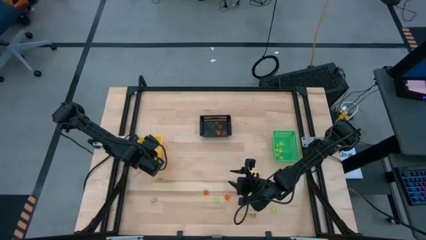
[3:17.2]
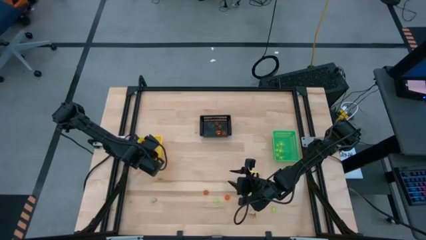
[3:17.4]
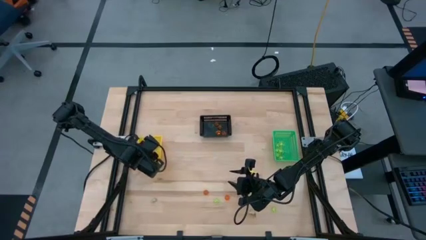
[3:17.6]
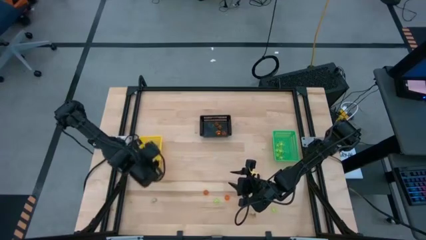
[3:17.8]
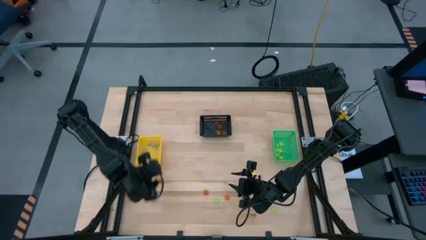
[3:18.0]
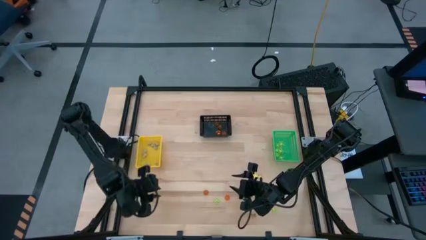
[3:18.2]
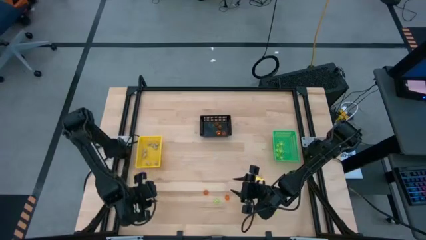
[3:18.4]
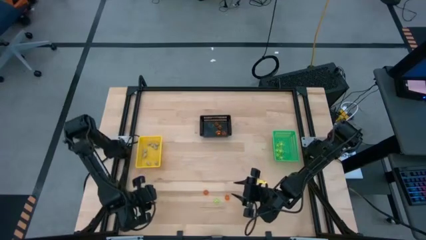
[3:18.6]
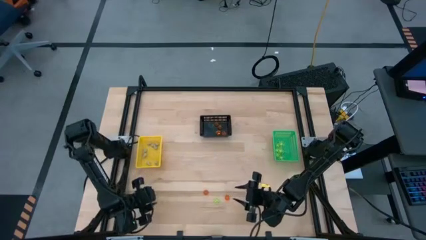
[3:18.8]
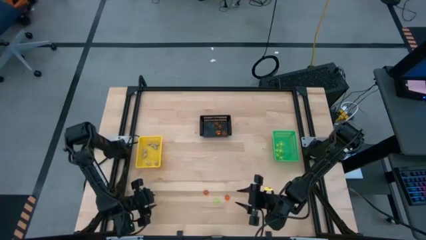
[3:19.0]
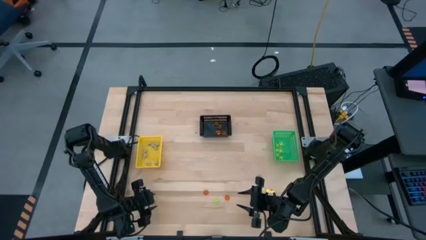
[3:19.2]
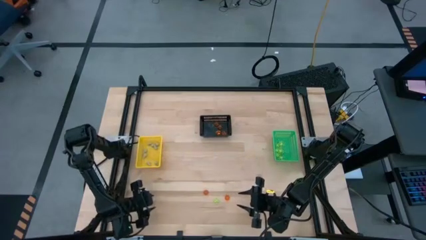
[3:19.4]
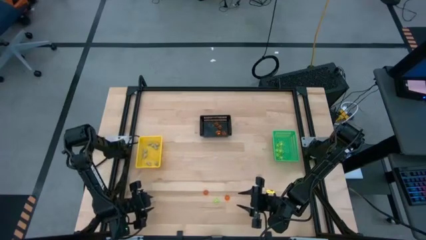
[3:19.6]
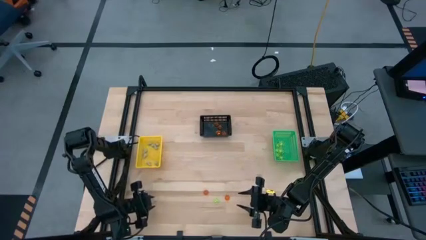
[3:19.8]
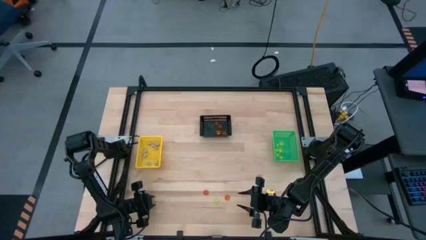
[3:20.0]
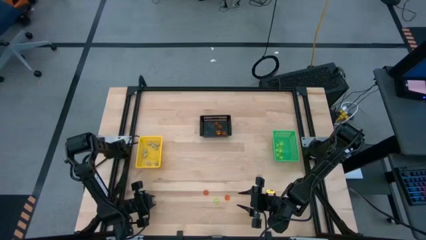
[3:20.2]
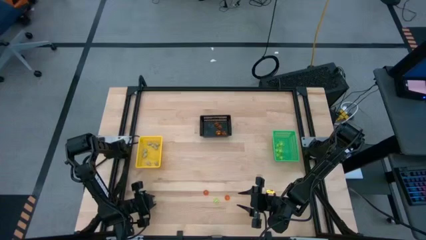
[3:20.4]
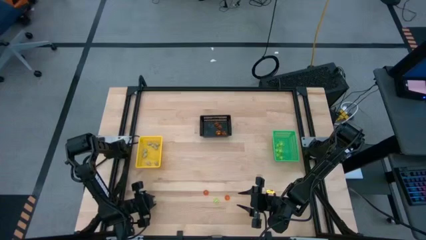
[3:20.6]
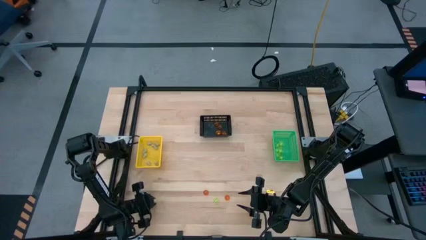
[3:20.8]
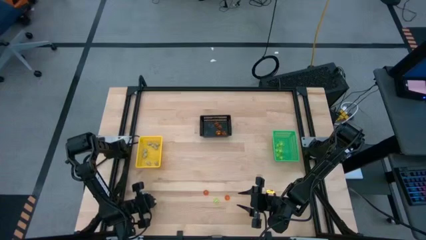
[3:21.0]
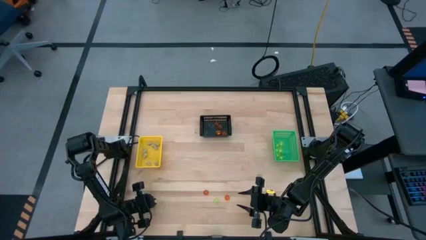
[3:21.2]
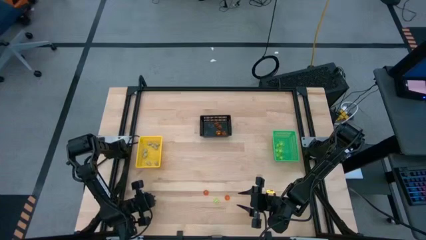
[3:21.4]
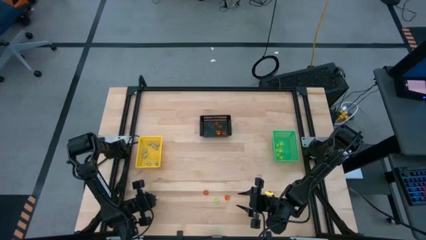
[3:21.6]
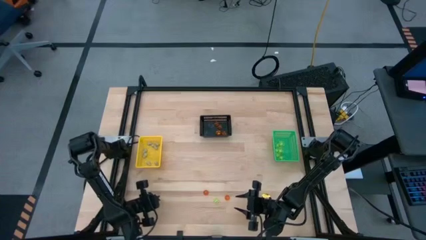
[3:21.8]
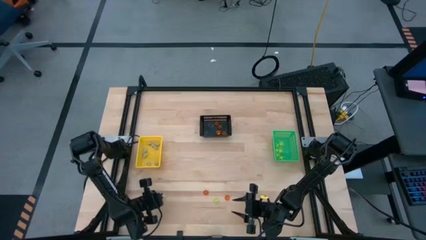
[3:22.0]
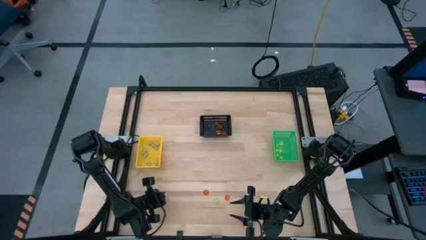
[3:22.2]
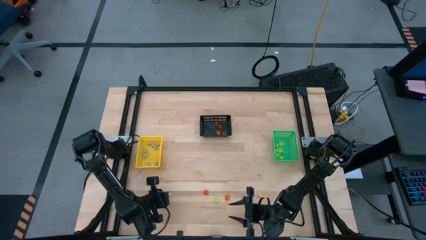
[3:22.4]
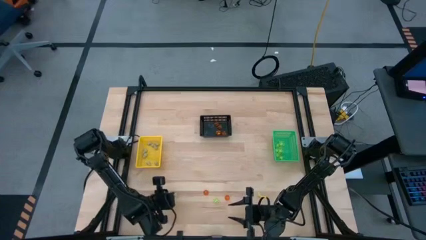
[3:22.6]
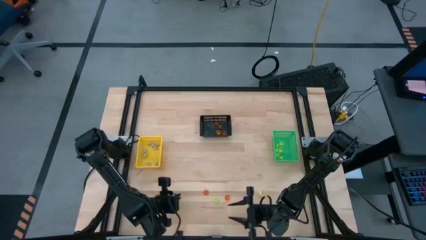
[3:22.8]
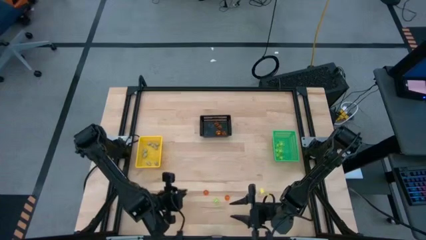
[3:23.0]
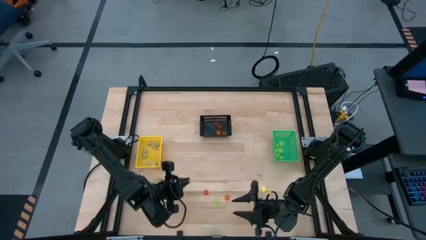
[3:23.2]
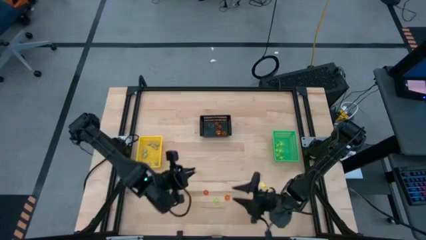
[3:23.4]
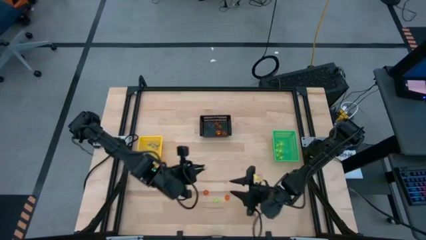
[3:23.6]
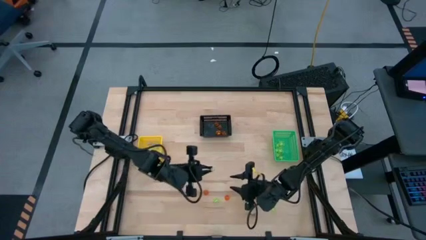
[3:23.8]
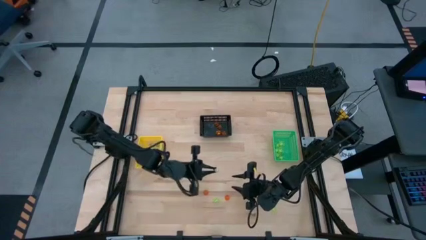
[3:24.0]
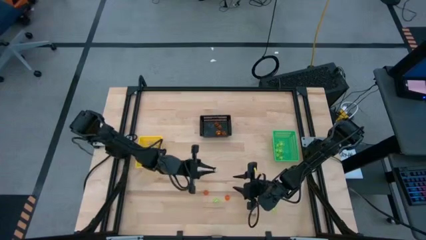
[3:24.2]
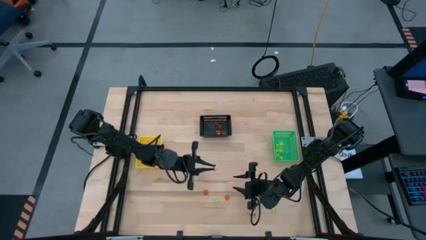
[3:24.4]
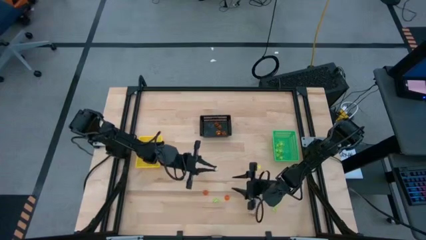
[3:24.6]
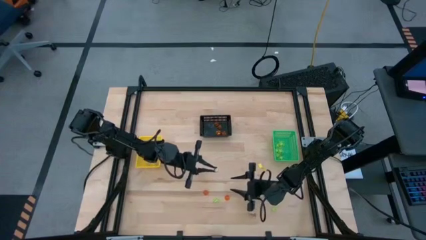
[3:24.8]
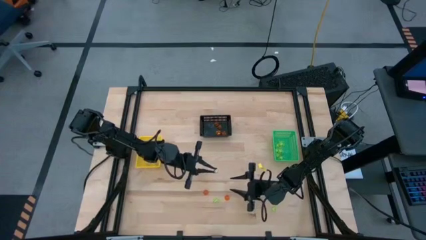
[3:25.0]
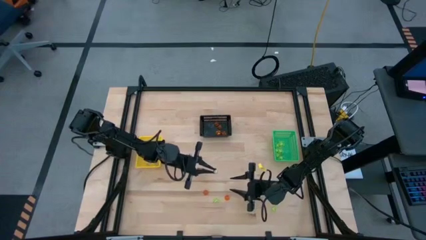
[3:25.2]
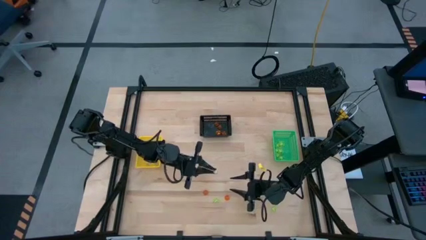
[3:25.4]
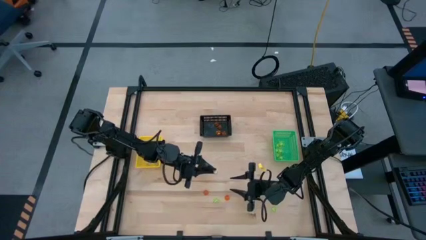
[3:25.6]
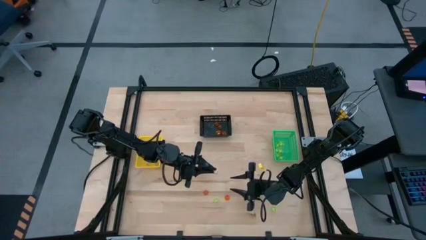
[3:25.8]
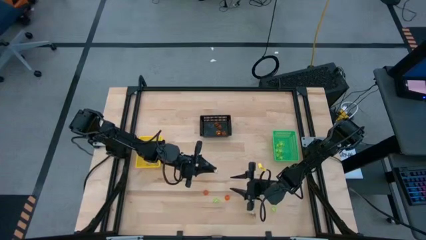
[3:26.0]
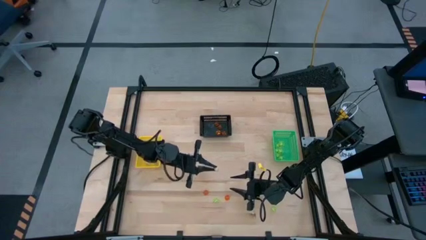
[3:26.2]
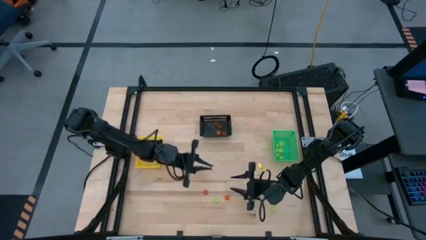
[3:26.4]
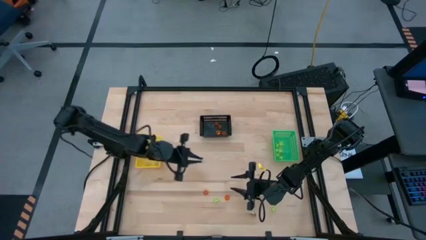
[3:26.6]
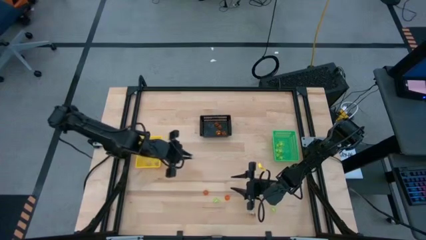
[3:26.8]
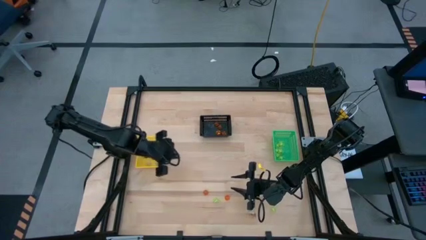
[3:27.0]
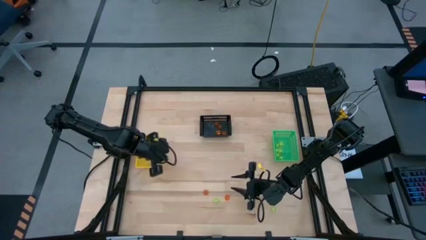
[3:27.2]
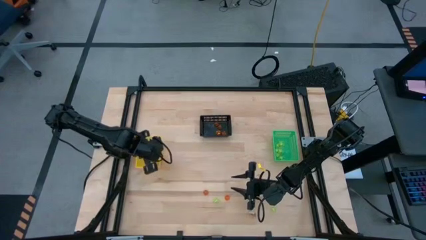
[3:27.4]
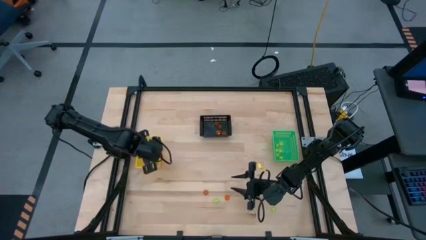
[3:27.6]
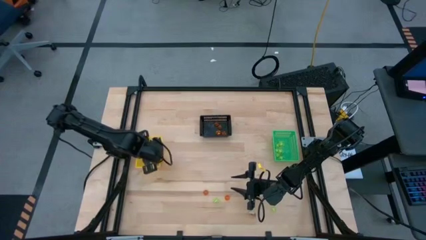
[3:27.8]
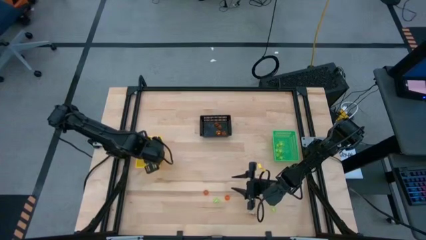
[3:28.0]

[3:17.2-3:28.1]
Task: Sort Halloween decoration
Put the white skull toy into the yellow bin

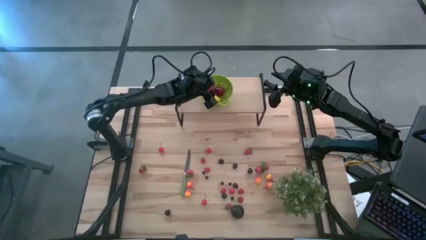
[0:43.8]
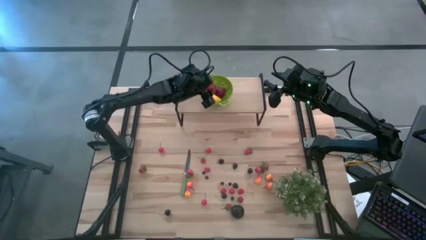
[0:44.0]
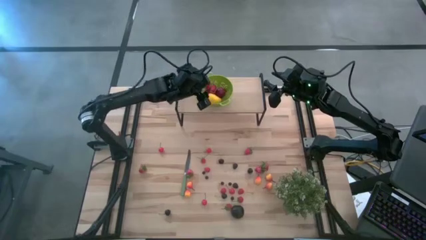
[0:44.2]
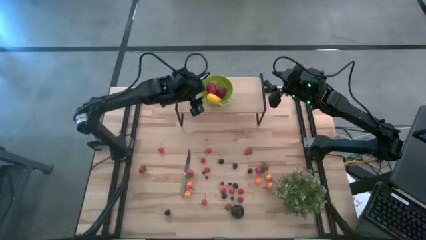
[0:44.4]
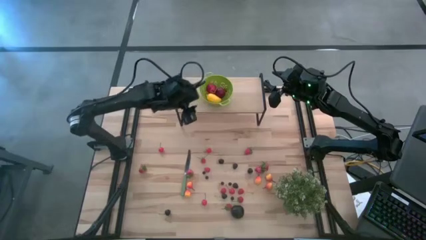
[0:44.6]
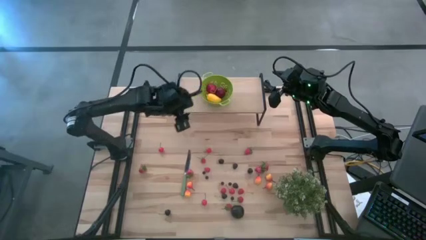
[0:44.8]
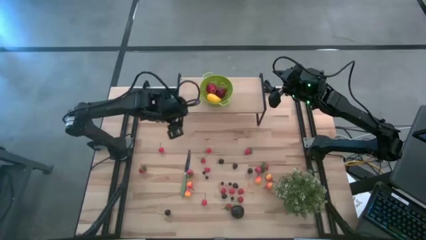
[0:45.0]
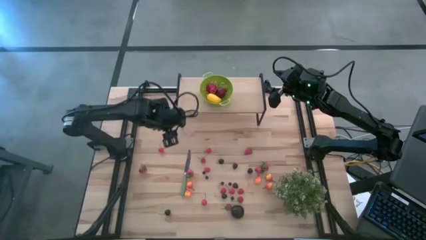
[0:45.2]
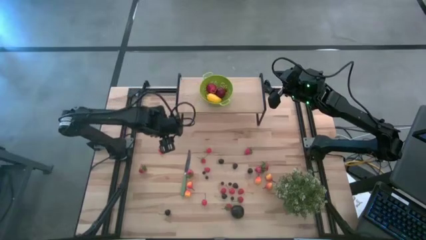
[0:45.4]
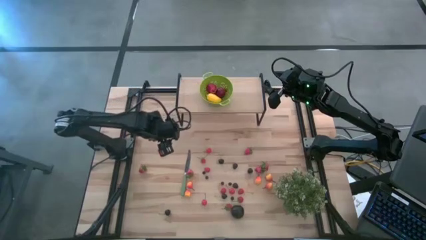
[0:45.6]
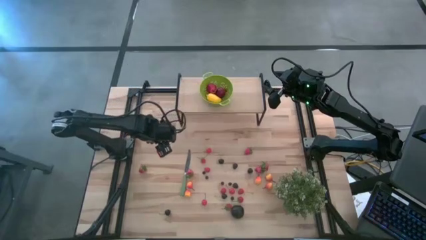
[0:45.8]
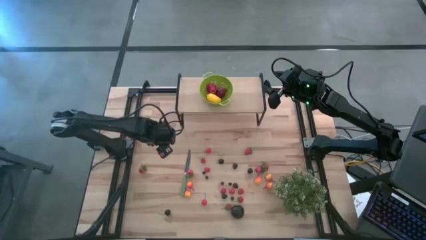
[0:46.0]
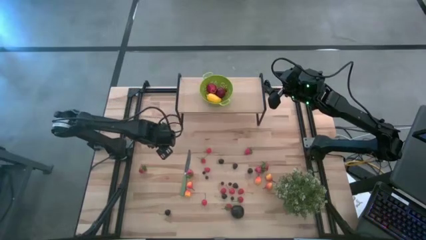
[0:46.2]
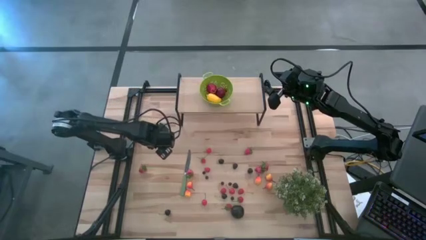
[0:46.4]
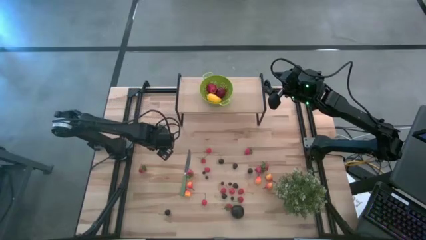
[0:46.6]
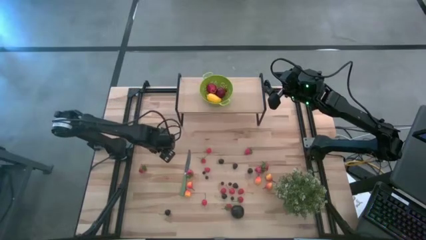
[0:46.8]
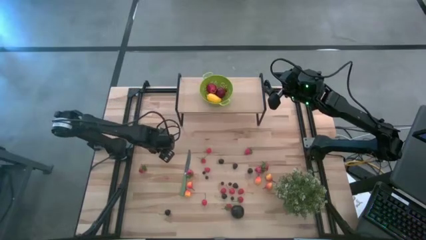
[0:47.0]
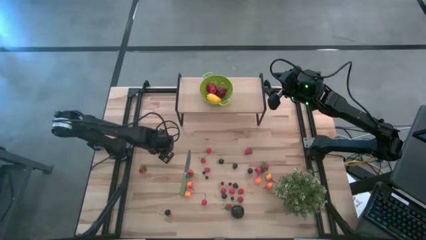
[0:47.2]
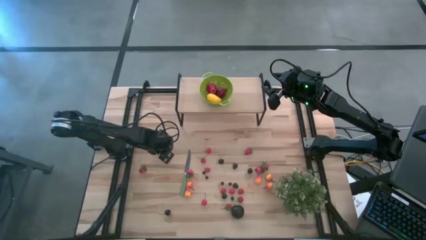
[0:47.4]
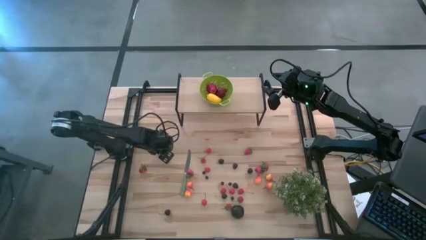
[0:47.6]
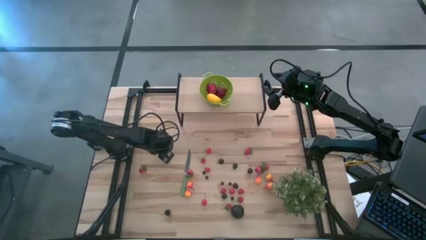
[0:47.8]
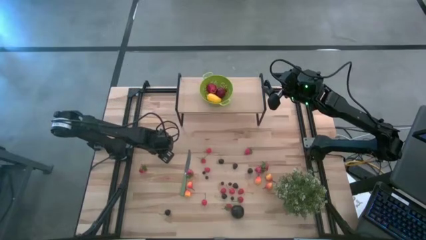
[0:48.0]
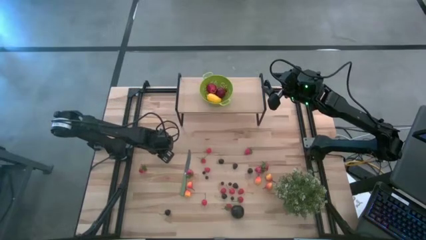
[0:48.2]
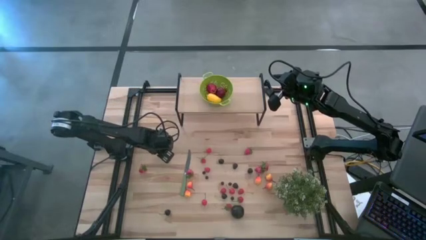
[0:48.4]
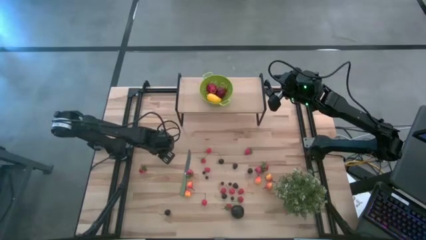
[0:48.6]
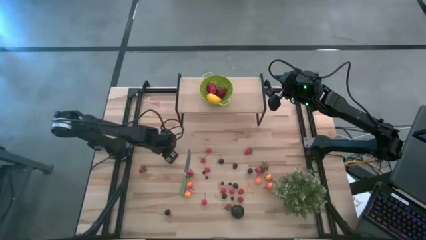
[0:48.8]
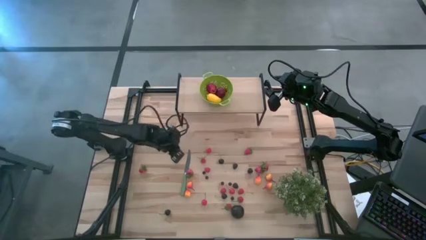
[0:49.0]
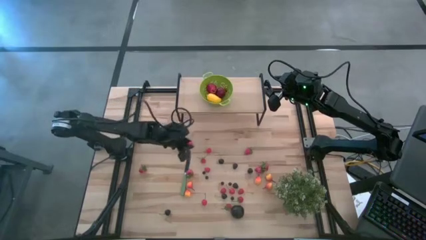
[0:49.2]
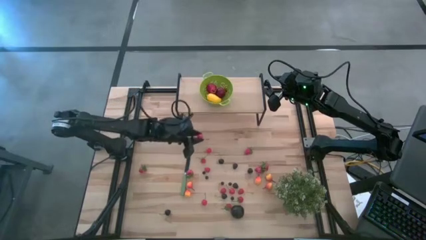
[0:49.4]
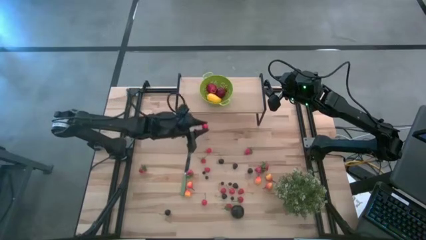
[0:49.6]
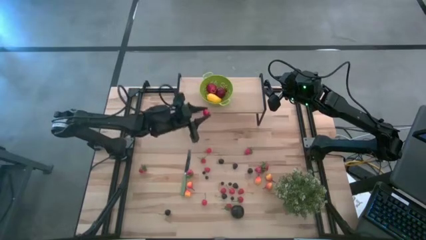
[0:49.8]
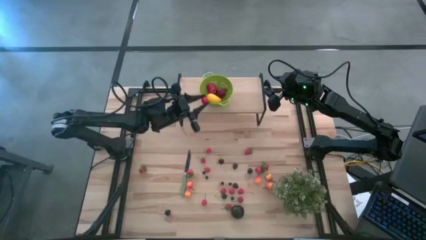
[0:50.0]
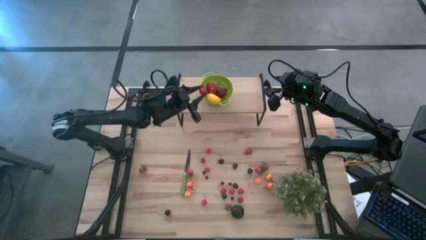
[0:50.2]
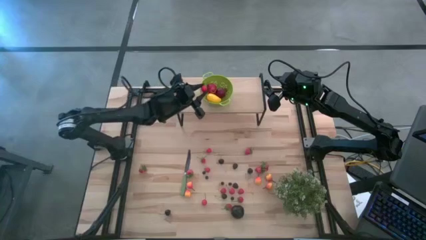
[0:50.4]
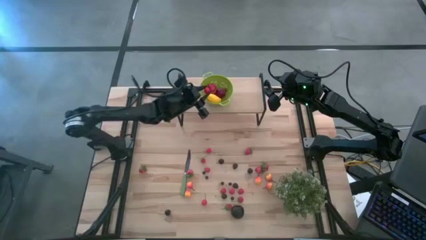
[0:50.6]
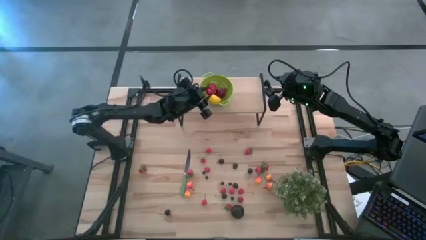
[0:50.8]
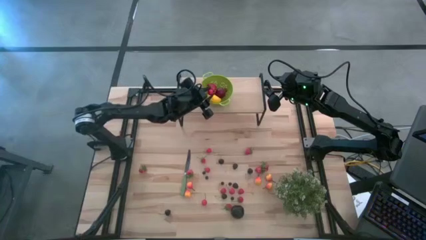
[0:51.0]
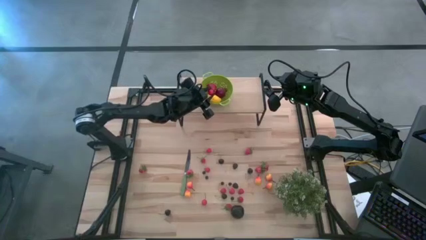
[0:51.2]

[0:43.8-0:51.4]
Task: Pick & Place Fruit
Put the red cherry into the green colander on the shelf
